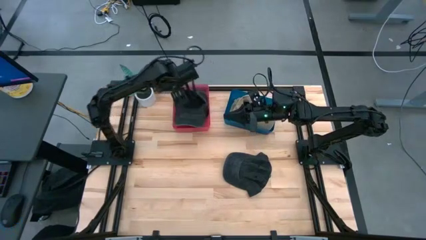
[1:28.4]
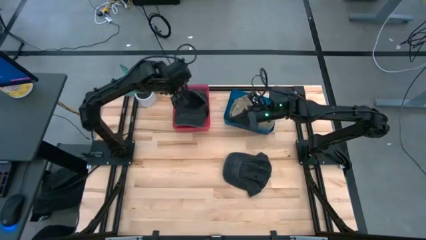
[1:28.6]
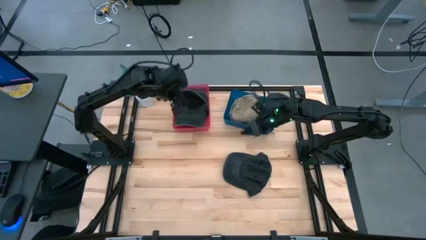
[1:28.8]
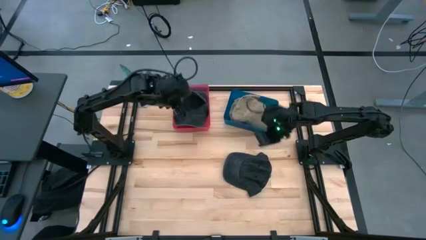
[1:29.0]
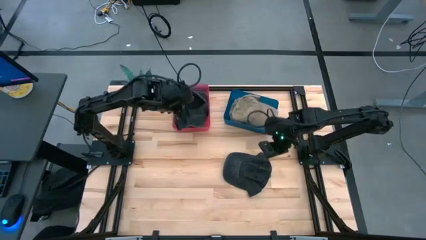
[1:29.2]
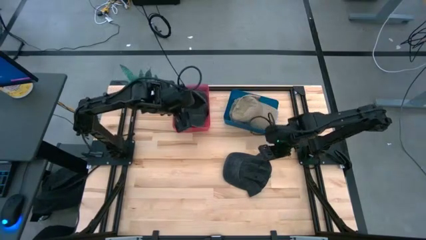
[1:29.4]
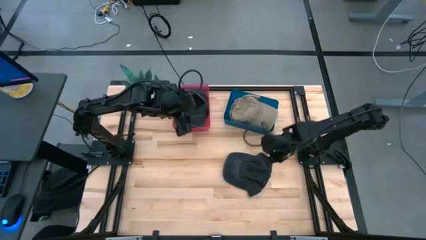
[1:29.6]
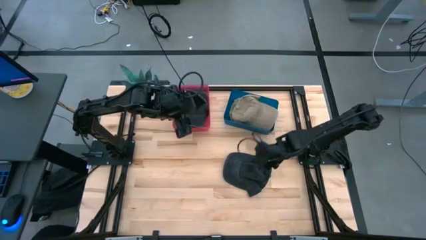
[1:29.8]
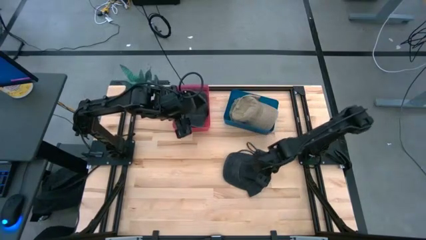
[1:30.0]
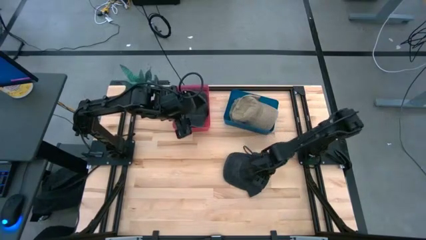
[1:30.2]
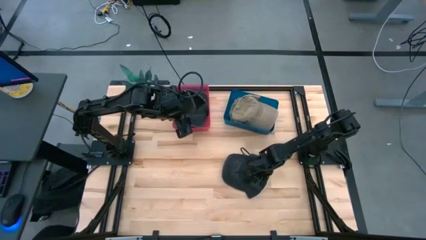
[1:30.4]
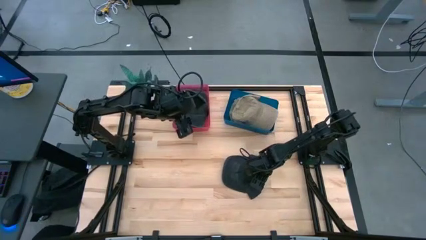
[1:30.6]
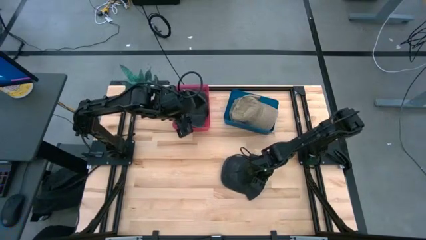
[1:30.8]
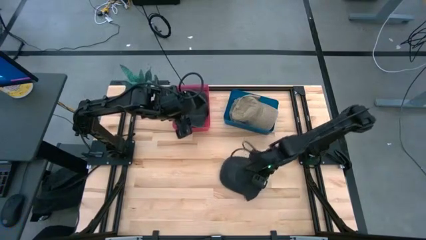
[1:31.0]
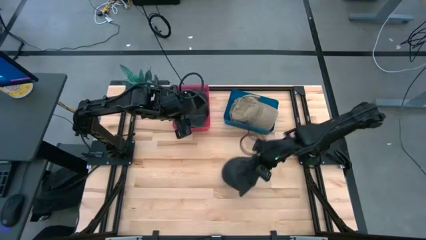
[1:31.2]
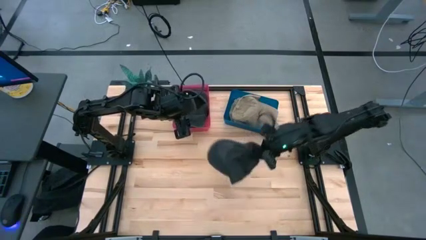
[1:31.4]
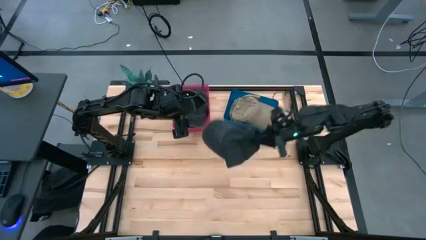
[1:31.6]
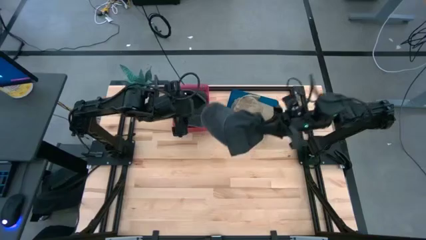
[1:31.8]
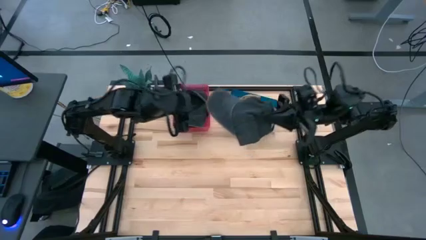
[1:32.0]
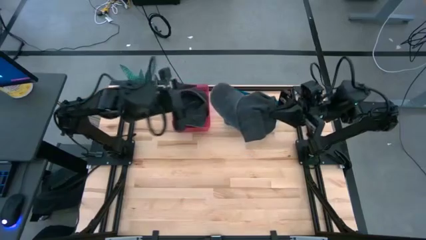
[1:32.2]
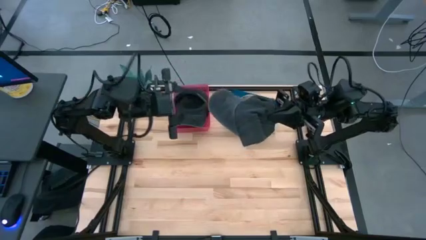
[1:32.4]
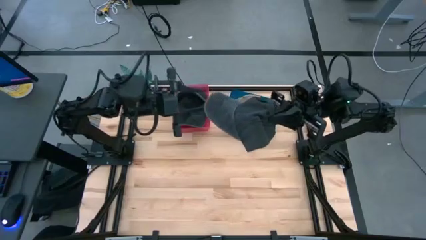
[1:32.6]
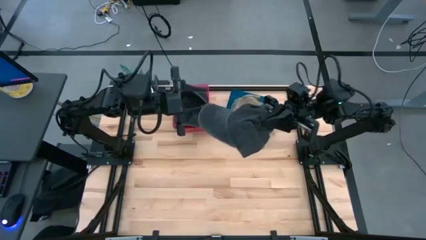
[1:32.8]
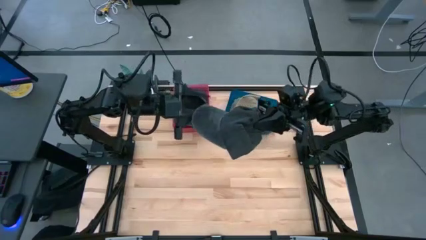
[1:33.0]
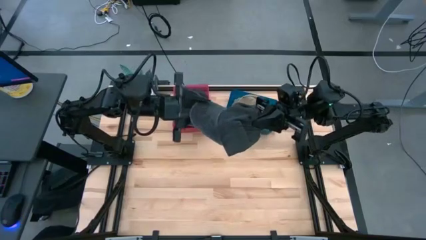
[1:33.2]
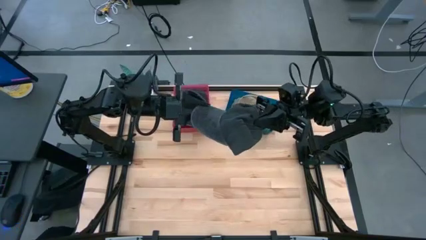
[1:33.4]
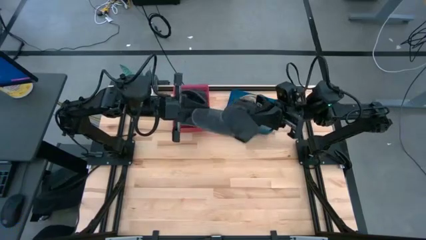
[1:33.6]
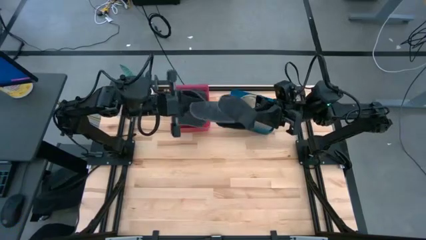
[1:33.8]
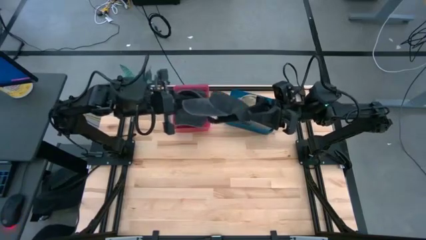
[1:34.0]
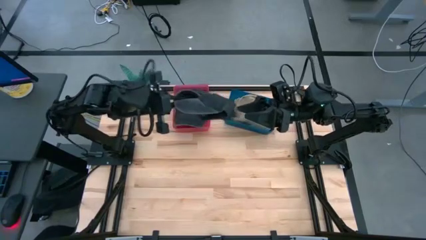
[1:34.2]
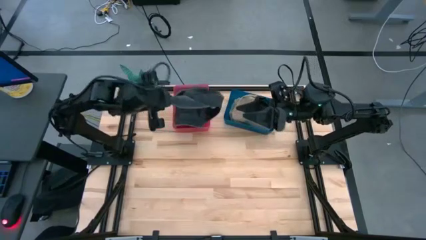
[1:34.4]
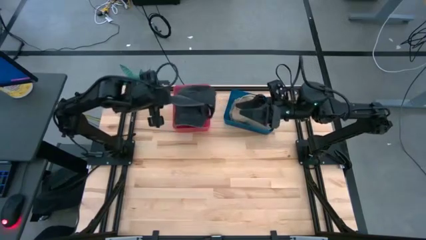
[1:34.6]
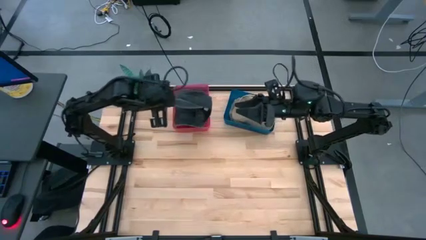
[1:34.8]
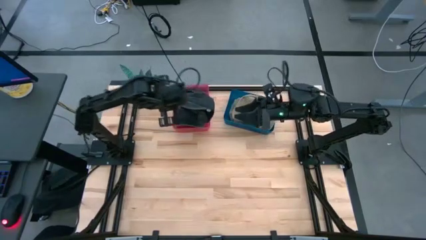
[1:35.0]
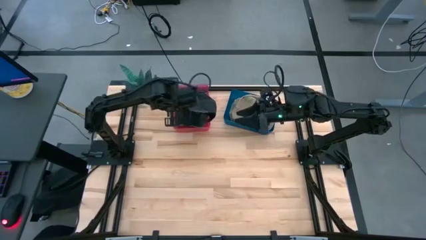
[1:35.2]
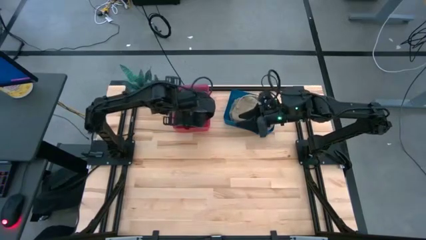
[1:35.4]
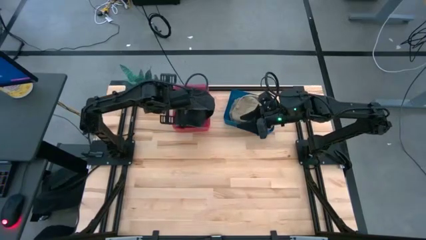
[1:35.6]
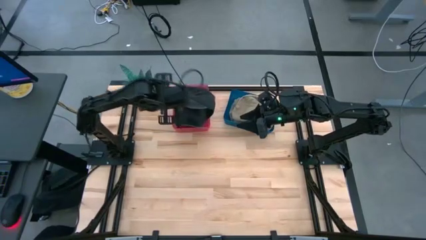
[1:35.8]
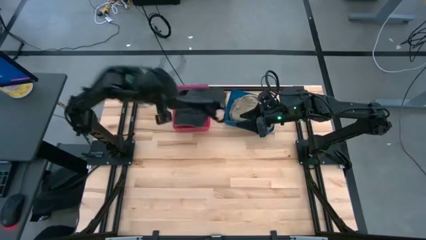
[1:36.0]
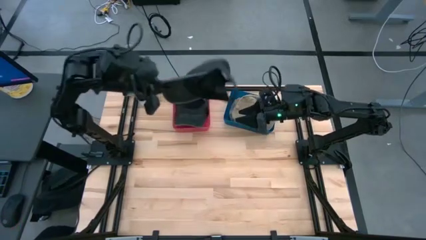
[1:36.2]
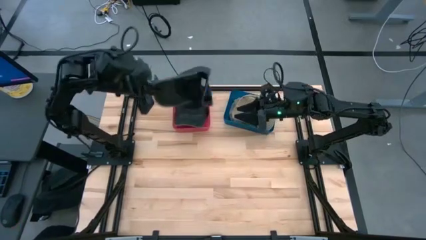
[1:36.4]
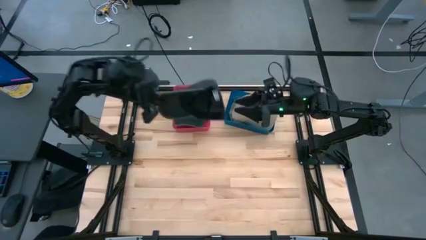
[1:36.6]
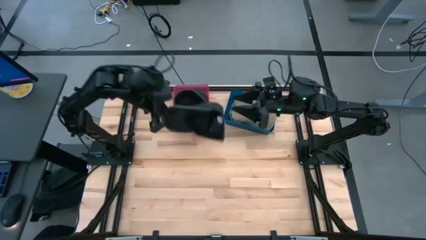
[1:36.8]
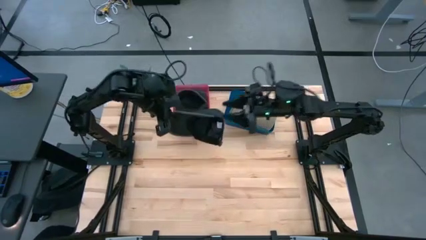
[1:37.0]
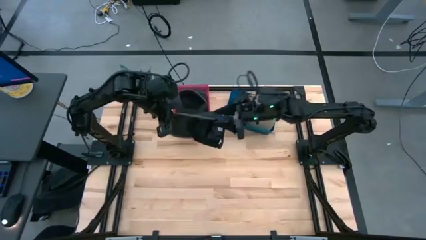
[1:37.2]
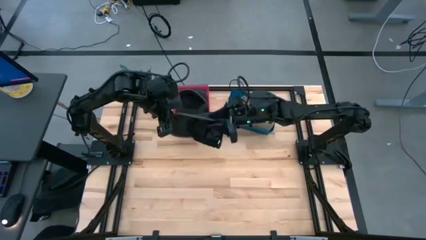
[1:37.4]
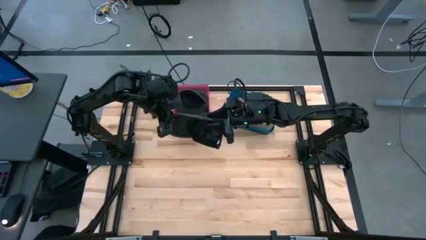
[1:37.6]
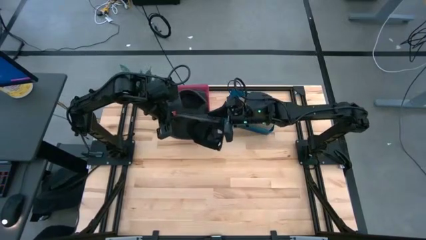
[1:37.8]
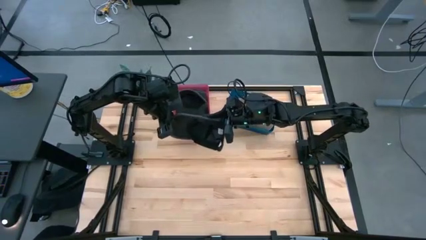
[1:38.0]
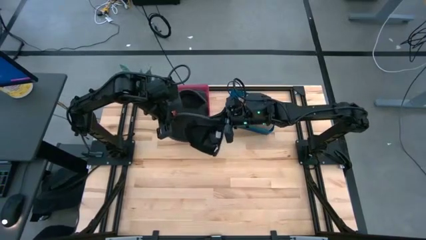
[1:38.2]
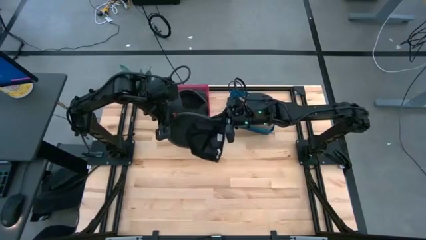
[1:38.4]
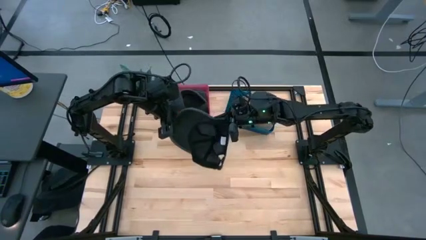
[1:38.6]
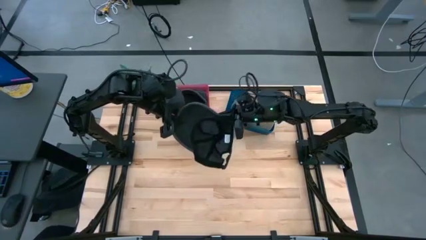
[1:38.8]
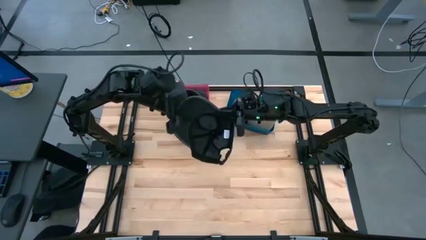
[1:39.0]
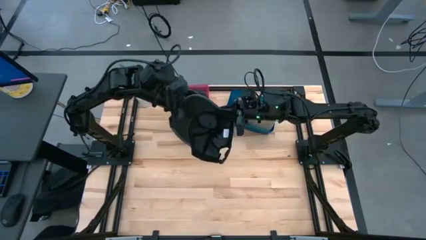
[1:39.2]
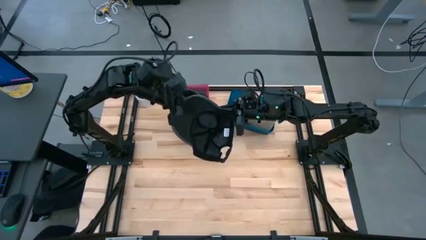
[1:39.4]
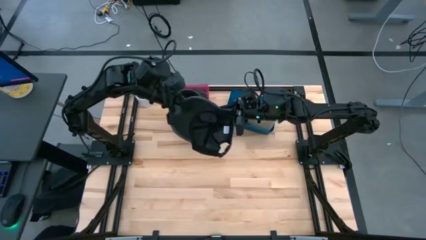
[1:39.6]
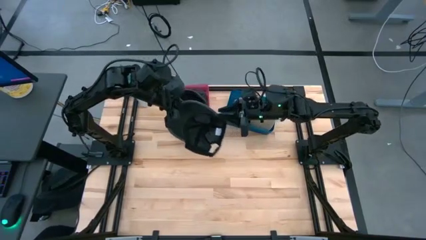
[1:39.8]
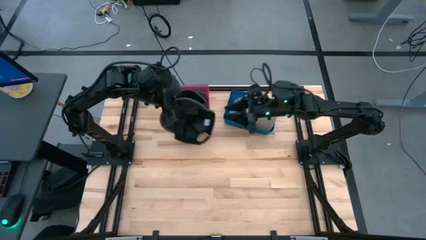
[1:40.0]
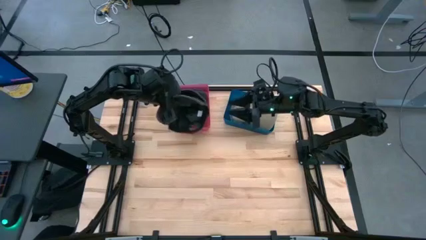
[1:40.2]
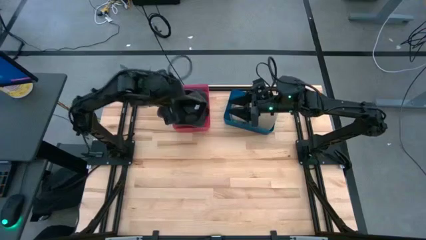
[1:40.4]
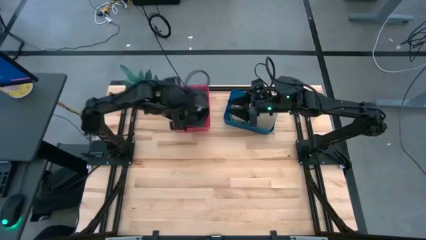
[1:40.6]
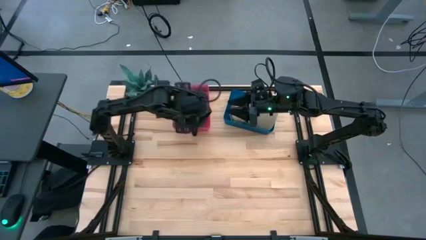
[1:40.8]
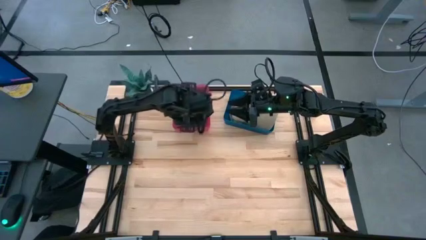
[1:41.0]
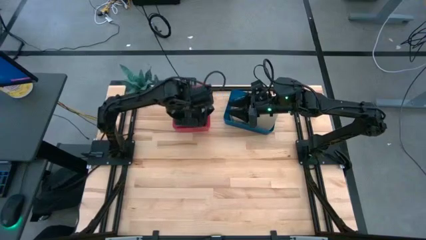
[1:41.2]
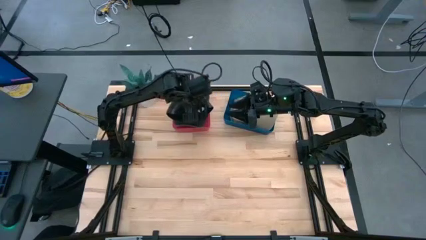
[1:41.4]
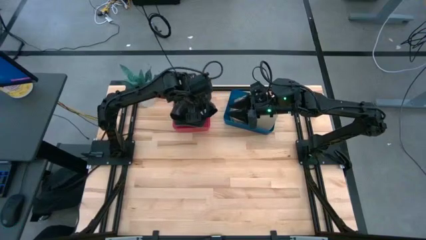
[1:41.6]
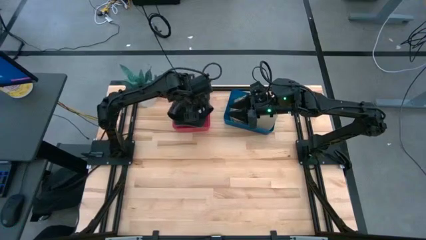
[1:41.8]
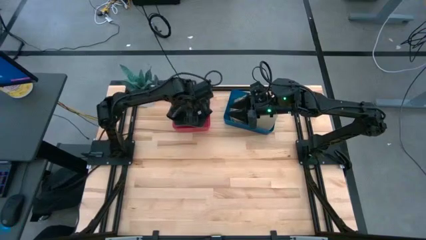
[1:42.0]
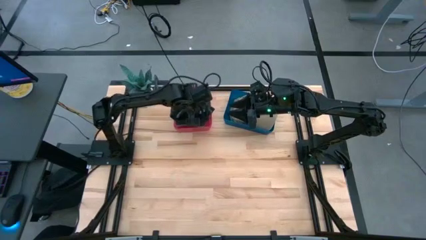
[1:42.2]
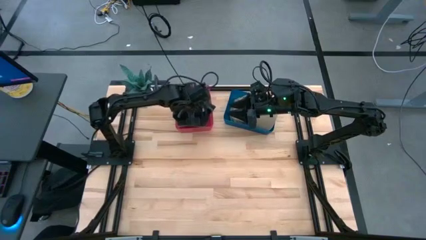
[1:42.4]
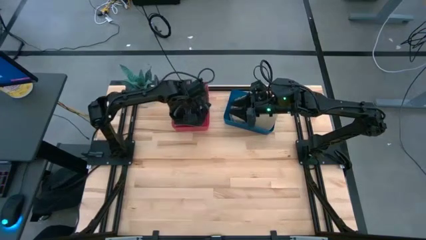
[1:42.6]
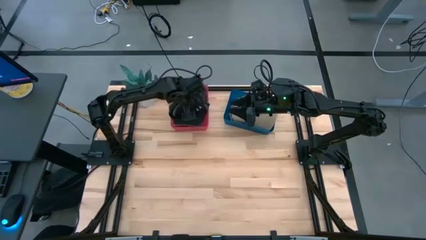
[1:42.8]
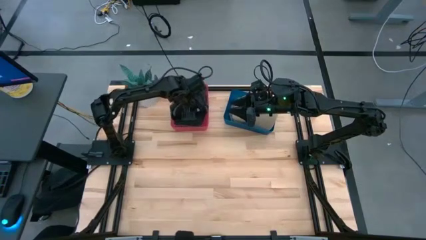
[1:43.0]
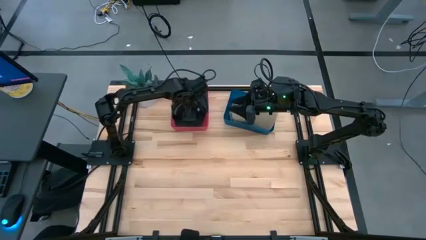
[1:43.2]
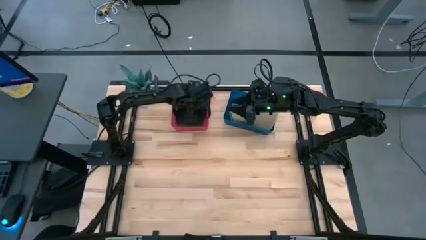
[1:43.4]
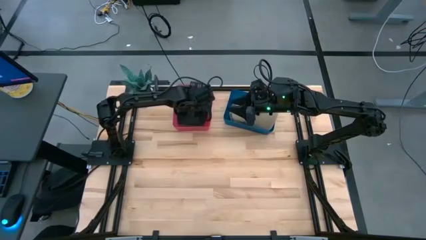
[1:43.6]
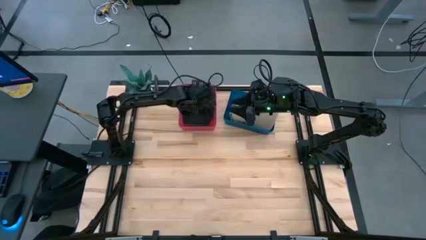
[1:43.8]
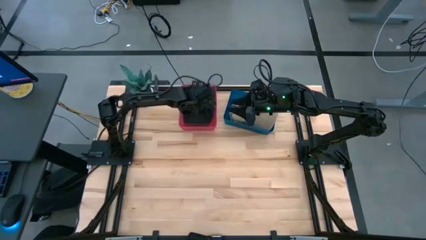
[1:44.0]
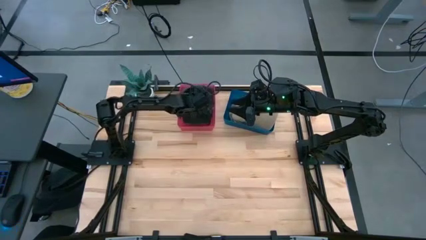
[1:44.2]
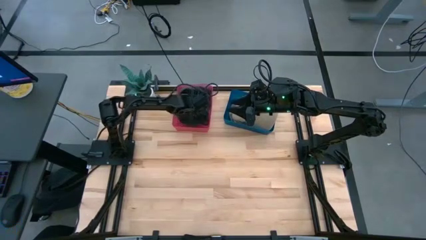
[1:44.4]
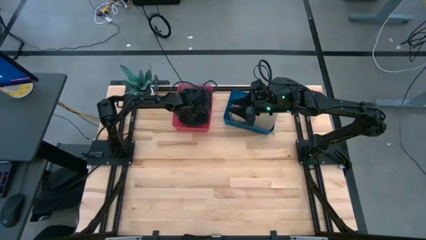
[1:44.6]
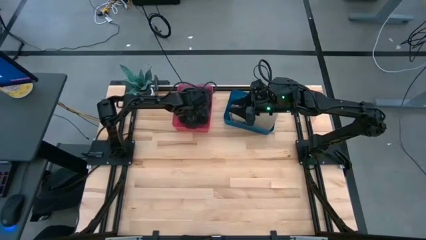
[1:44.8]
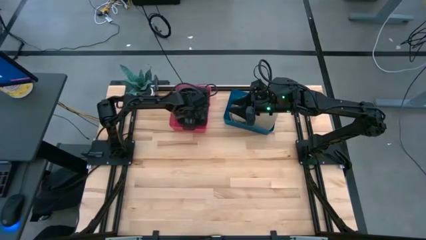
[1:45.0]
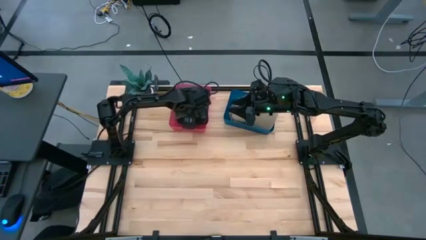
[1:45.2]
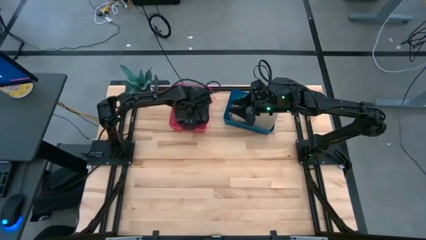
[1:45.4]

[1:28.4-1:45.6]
Task: Pick & Place hat
Stack the black cap on top of the black cap on the blue bin
